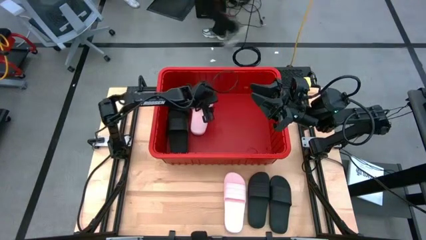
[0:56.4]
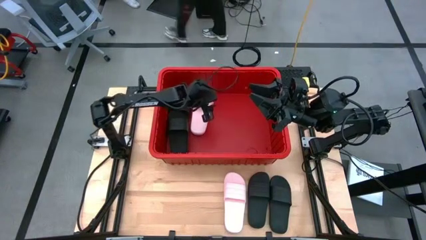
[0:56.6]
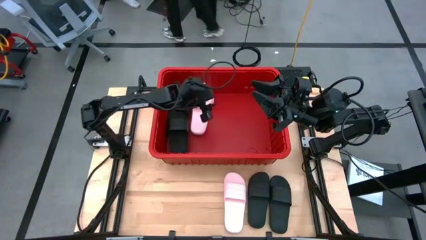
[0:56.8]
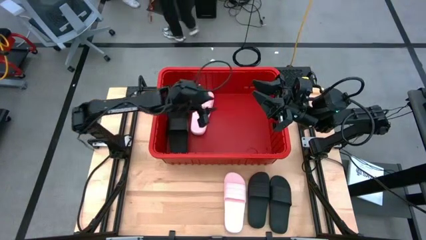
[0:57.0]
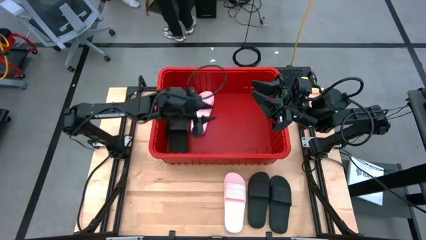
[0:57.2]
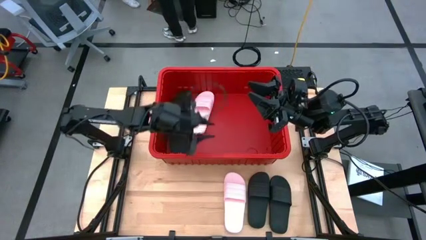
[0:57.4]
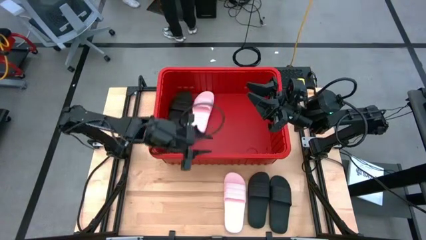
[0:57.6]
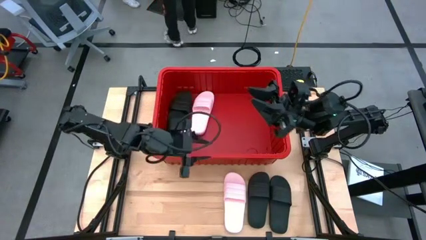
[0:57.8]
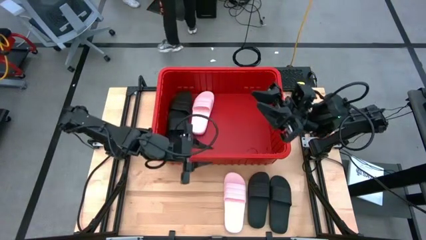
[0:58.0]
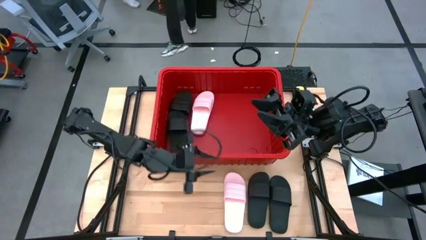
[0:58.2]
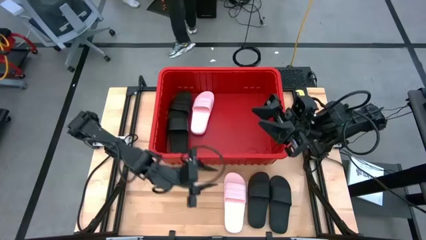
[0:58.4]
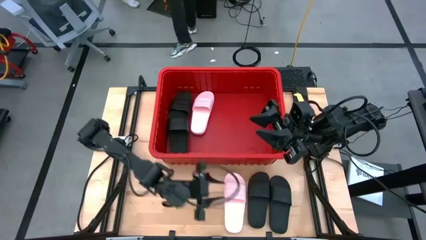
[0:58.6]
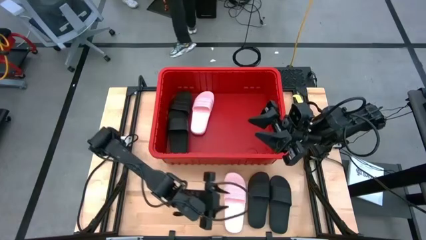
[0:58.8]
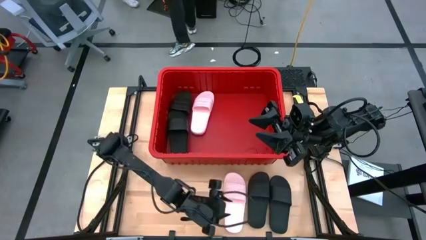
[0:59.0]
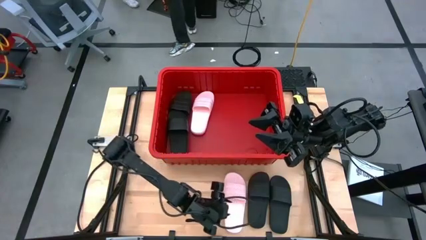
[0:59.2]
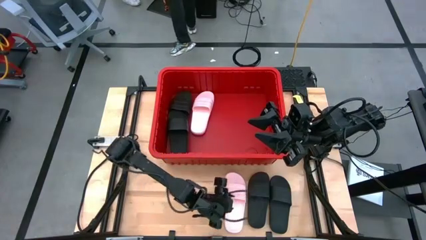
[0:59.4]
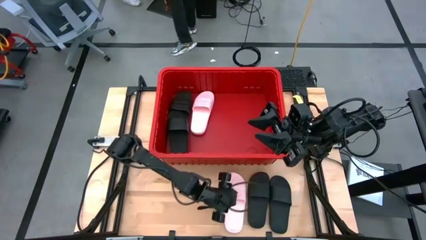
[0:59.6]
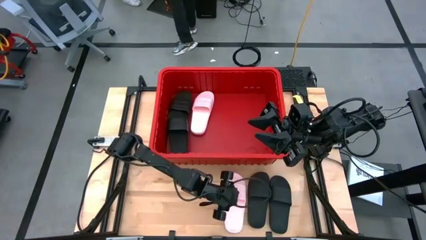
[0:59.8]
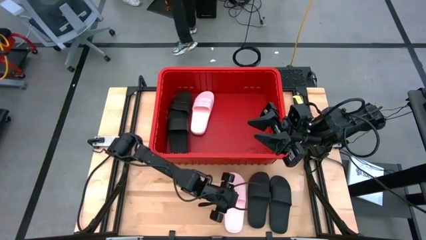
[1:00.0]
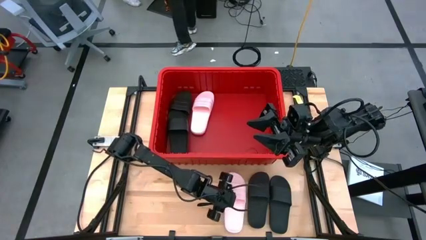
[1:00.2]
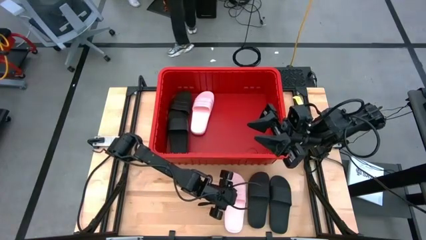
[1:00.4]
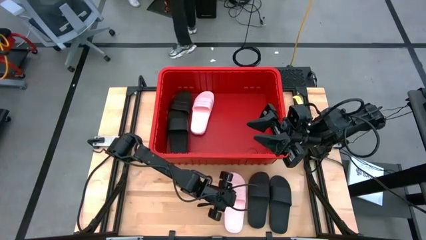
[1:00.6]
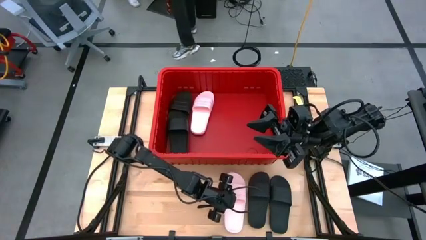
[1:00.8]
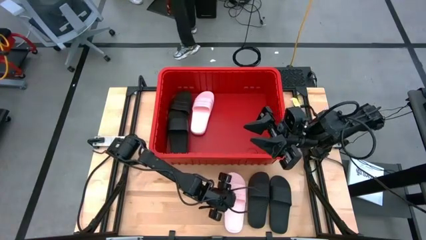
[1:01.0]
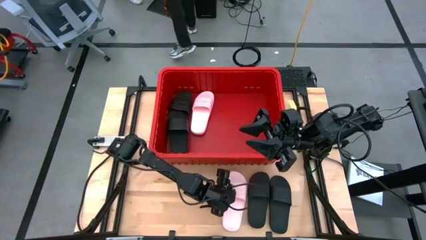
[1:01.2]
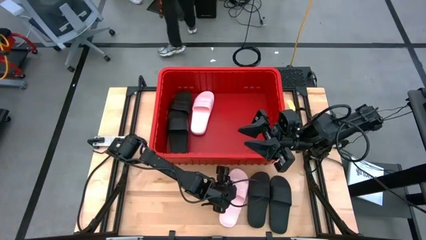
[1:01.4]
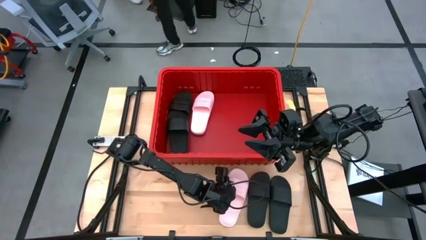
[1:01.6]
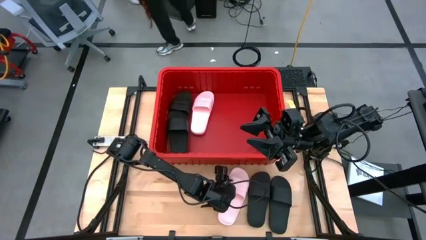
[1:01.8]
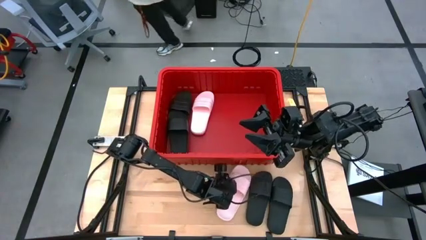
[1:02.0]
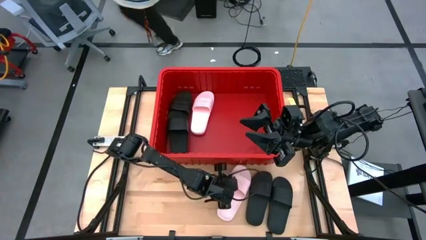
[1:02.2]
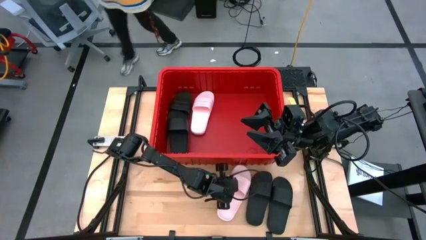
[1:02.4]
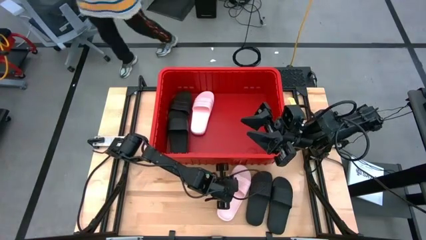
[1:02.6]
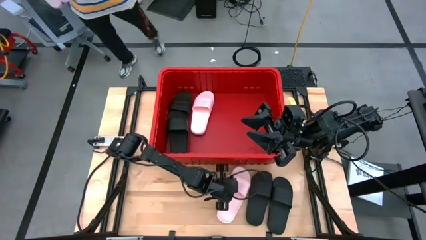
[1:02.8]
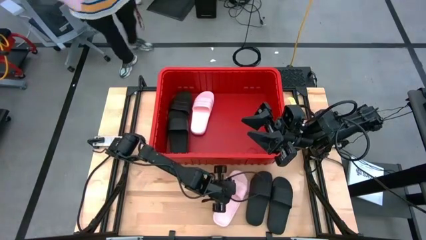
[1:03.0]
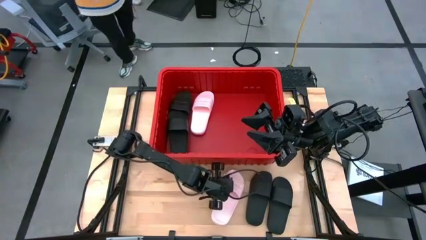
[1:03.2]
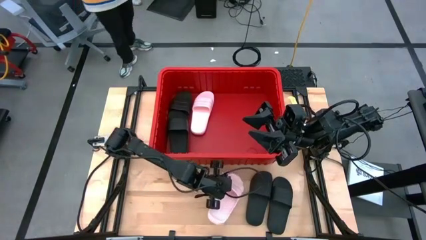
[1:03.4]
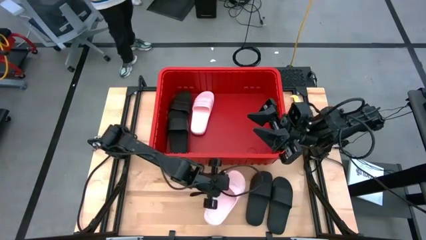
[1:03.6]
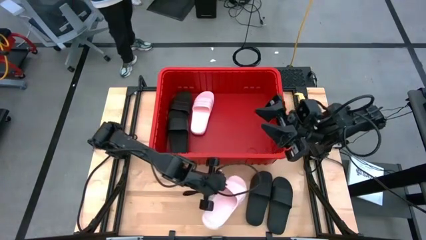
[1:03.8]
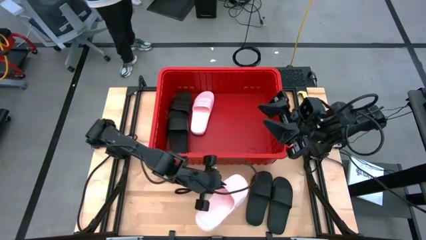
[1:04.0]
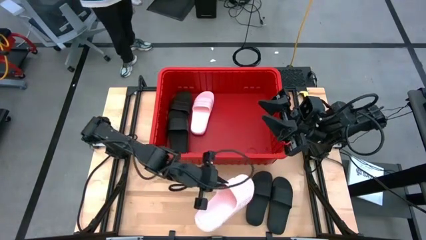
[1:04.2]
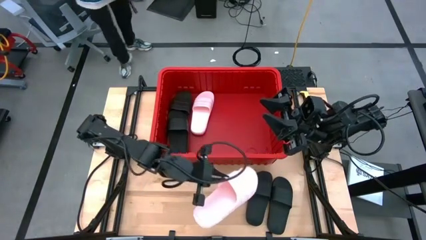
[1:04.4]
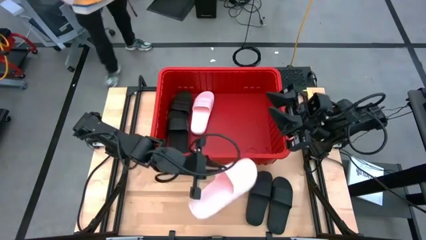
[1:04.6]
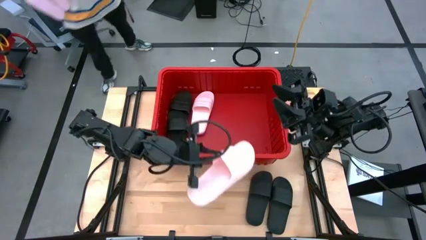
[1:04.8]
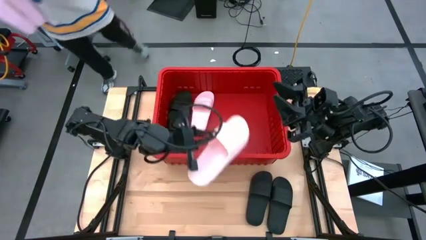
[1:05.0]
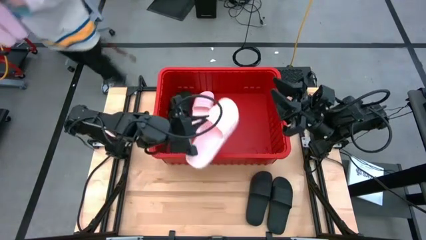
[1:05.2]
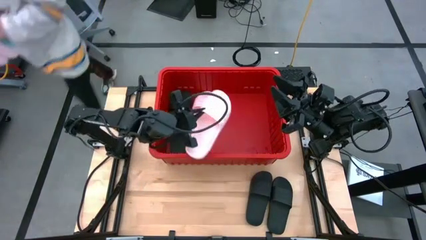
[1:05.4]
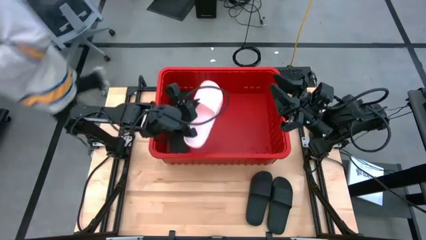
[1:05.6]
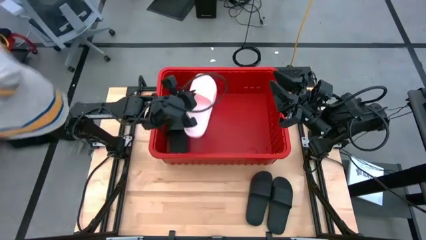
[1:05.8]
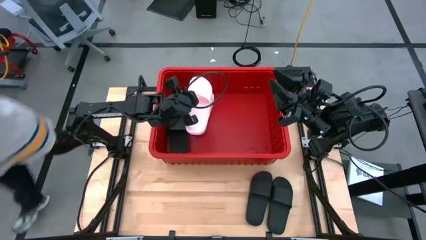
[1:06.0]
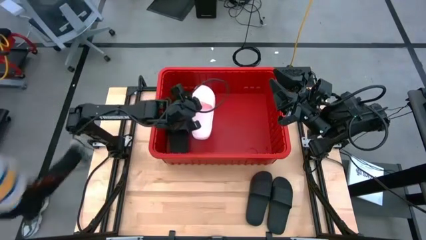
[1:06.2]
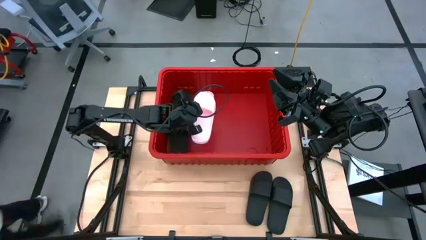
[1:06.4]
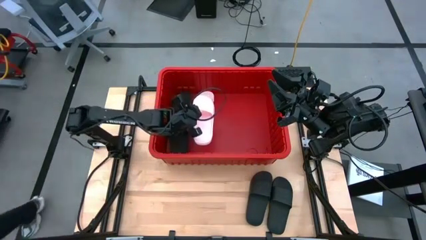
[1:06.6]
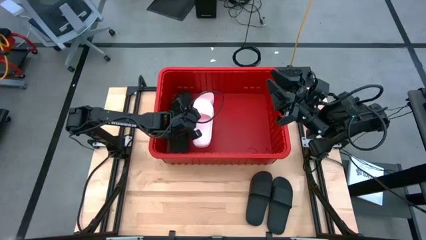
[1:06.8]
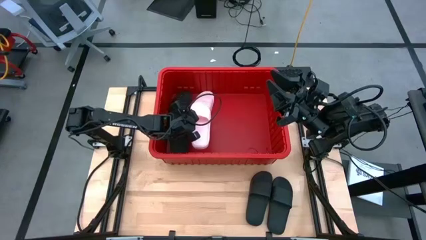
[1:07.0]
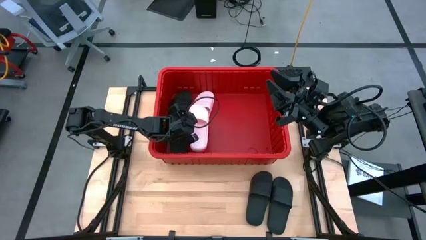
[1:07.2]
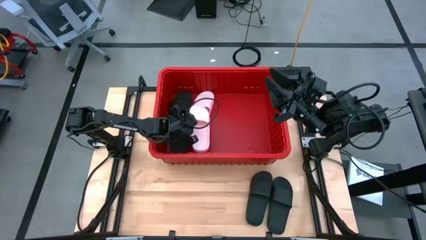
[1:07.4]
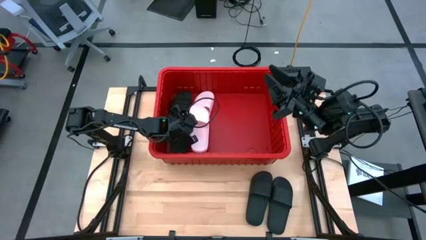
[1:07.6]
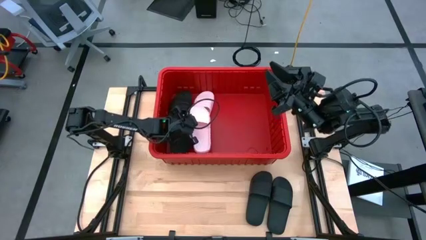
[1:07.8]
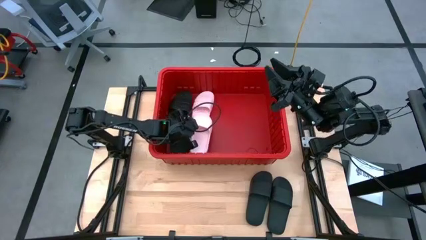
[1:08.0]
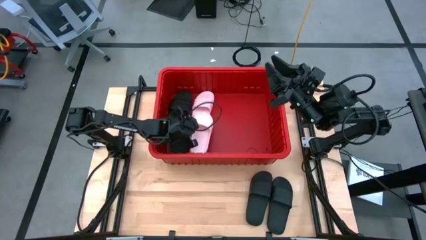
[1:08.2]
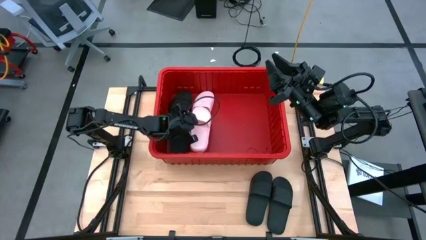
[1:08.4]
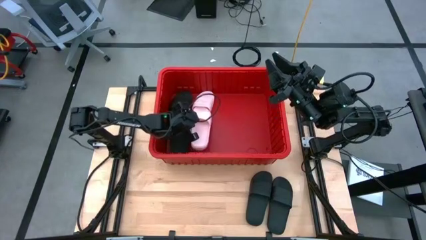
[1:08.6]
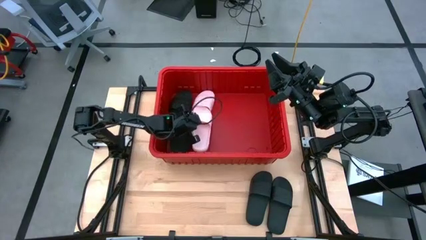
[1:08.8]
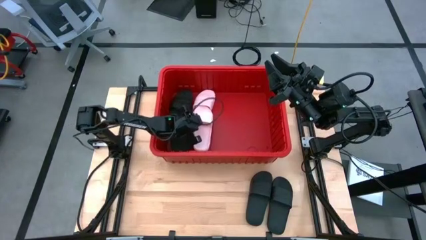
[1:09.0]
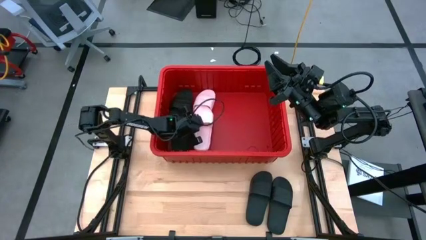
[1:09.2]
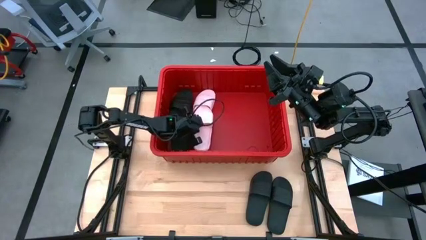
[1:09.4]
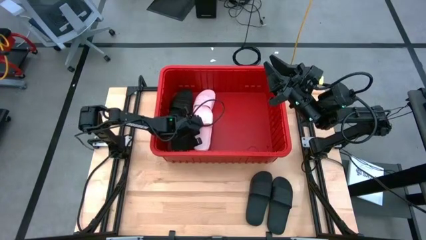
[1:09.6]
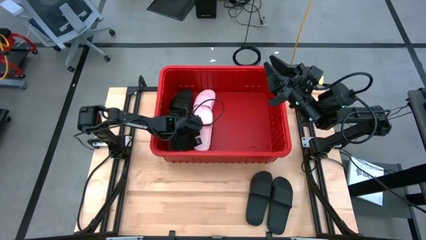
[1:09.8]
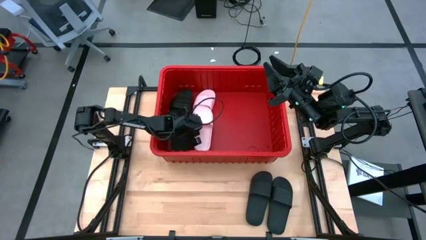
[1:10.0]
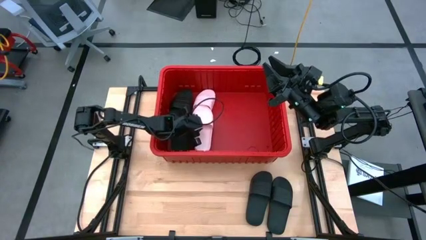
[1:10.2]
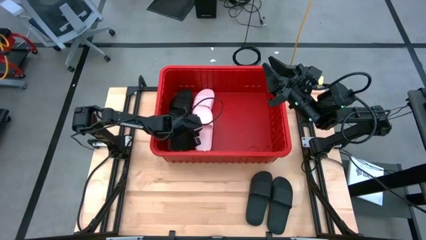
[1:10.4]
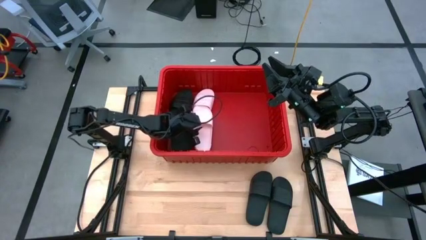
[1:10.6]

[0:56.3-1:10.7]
Task: Pick and place slides into bin
Put the pink slide into the red bin
